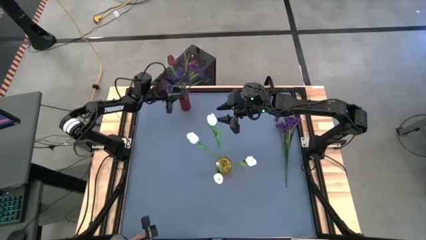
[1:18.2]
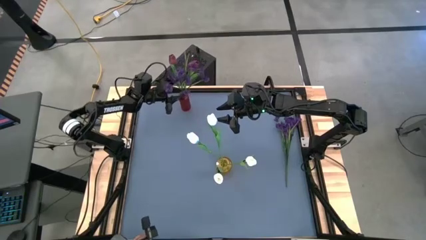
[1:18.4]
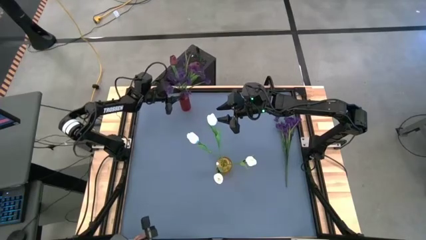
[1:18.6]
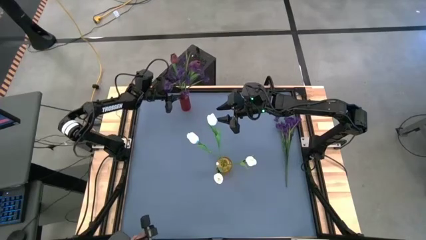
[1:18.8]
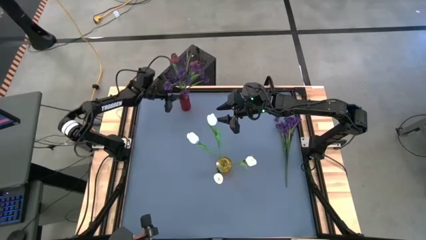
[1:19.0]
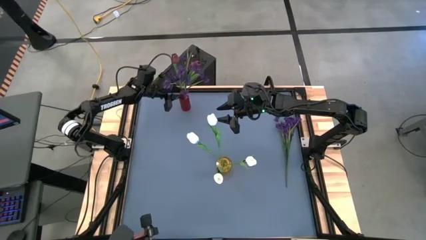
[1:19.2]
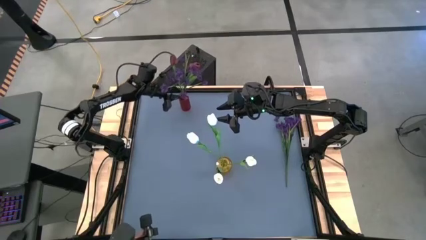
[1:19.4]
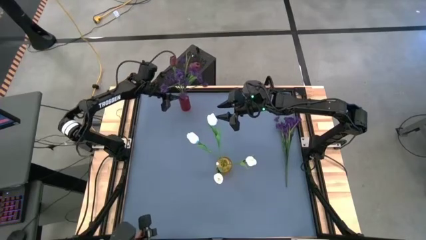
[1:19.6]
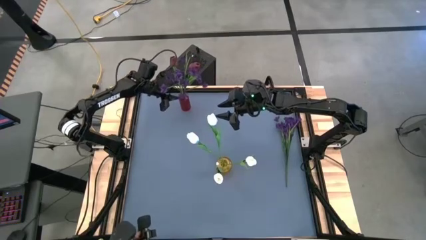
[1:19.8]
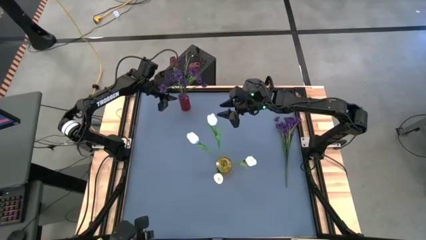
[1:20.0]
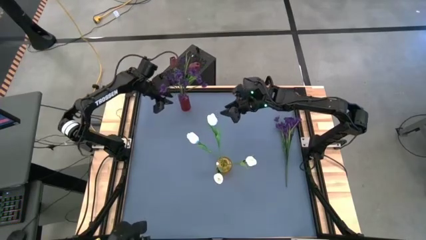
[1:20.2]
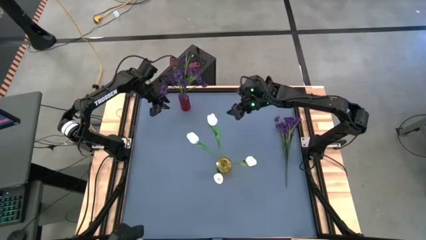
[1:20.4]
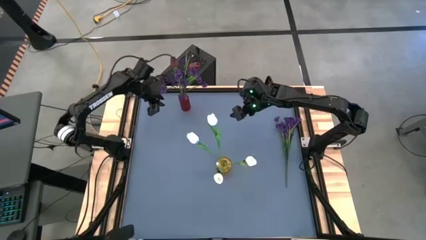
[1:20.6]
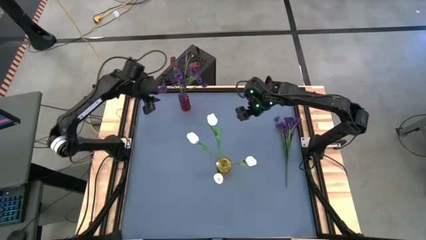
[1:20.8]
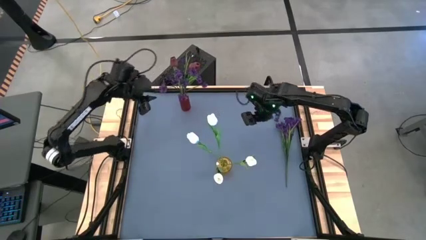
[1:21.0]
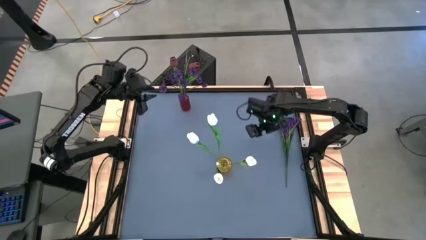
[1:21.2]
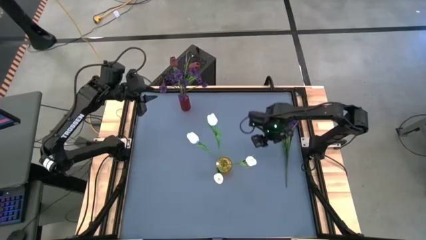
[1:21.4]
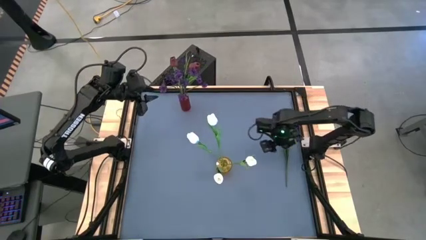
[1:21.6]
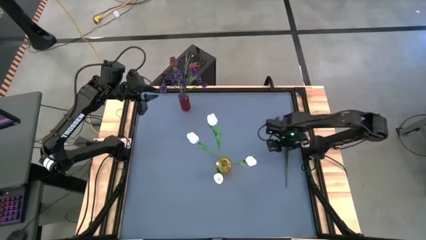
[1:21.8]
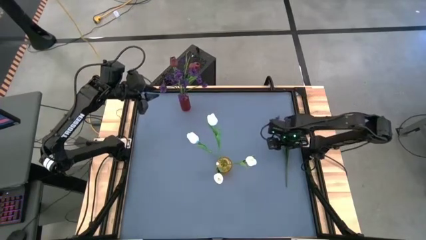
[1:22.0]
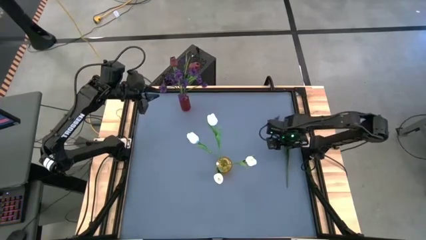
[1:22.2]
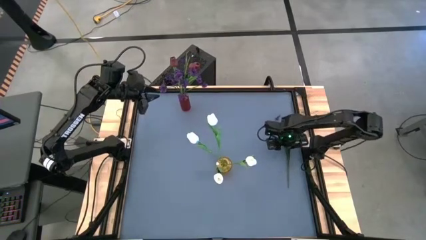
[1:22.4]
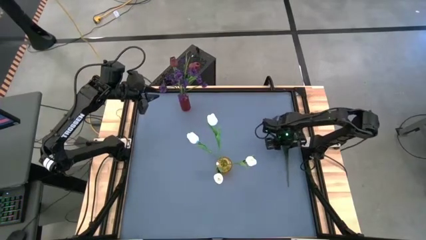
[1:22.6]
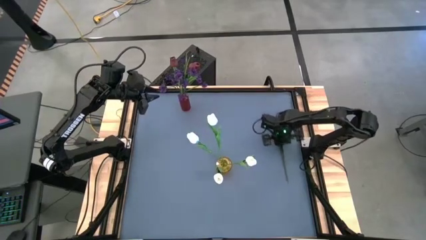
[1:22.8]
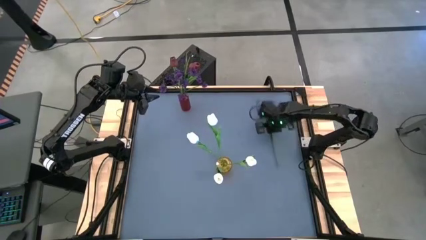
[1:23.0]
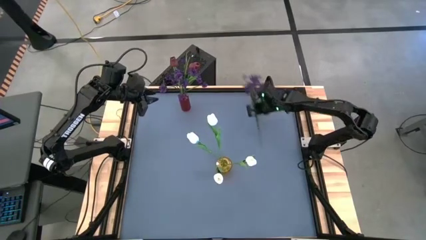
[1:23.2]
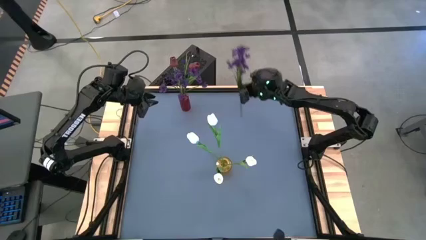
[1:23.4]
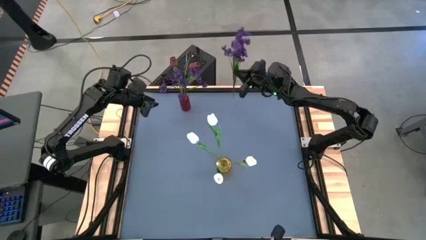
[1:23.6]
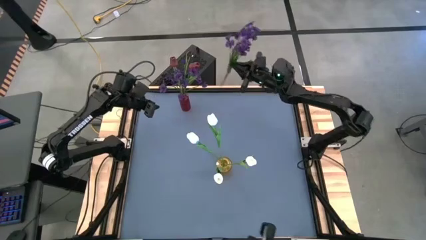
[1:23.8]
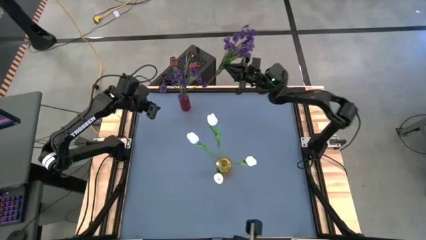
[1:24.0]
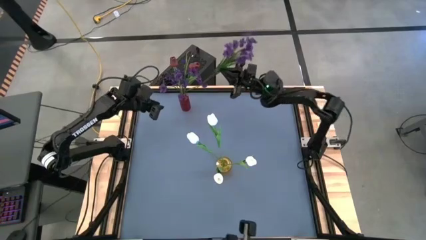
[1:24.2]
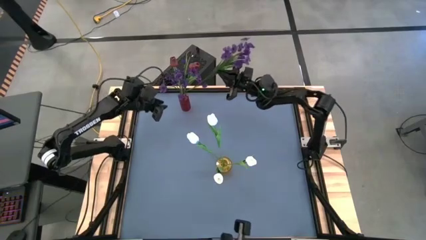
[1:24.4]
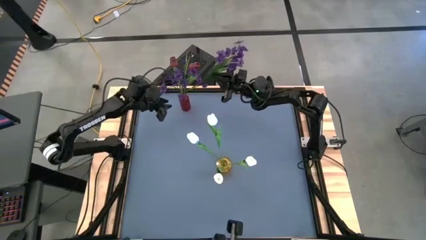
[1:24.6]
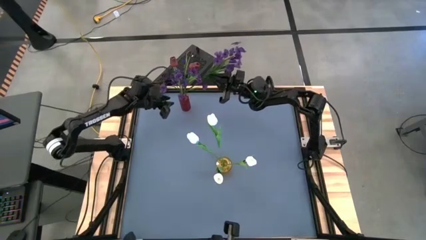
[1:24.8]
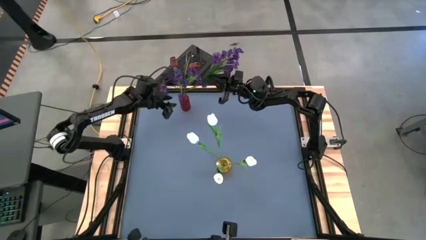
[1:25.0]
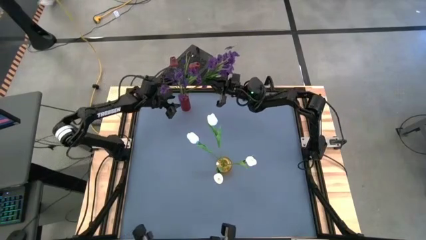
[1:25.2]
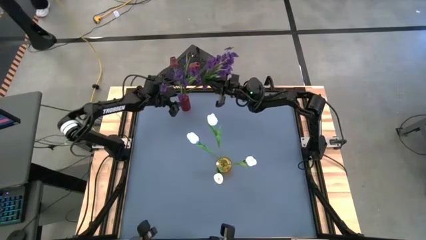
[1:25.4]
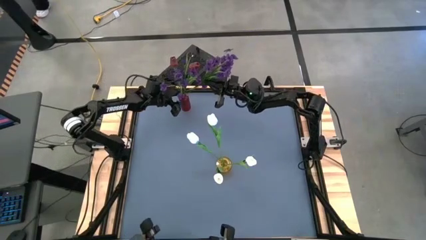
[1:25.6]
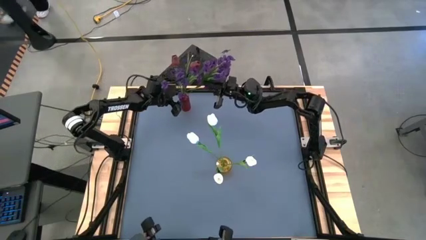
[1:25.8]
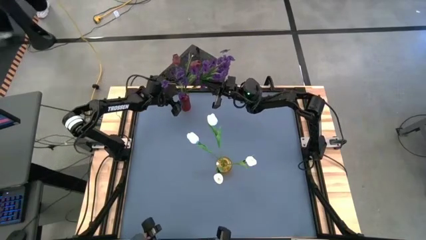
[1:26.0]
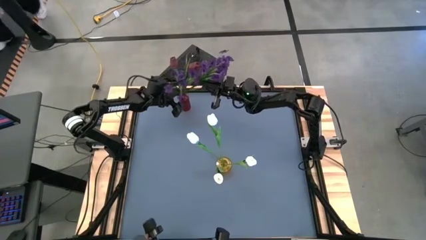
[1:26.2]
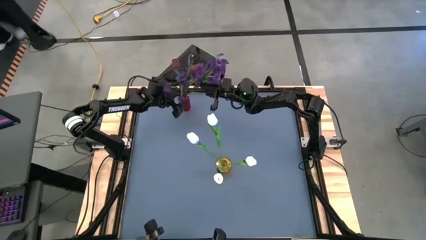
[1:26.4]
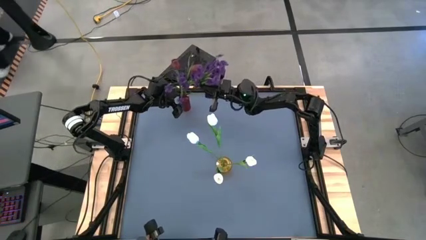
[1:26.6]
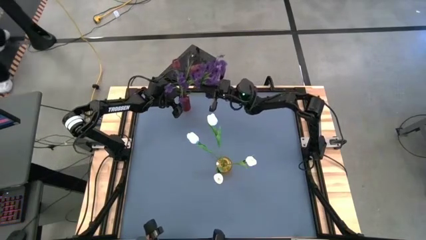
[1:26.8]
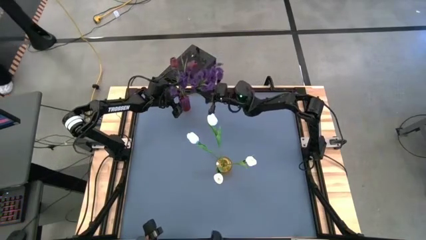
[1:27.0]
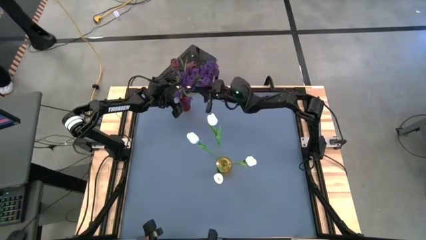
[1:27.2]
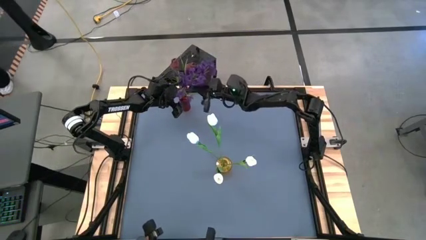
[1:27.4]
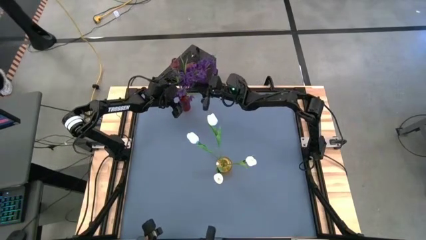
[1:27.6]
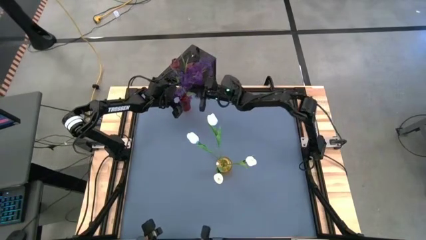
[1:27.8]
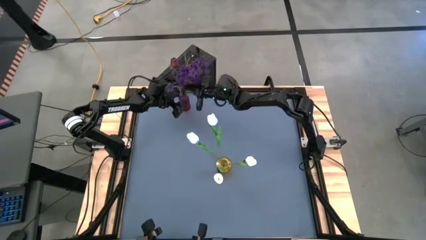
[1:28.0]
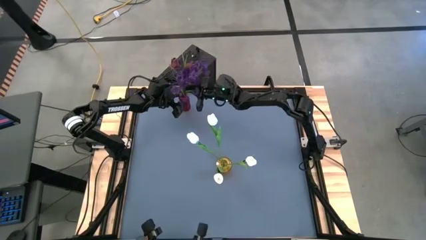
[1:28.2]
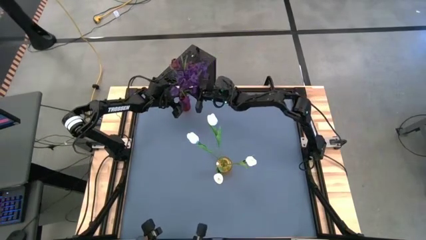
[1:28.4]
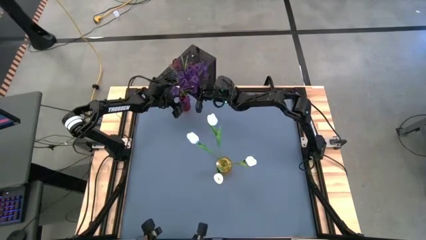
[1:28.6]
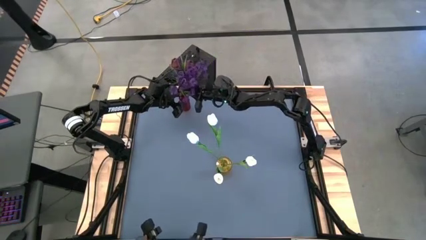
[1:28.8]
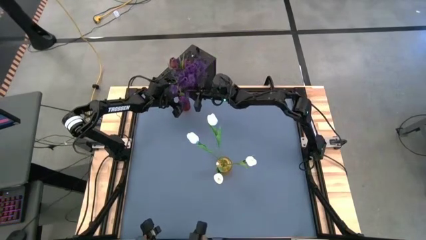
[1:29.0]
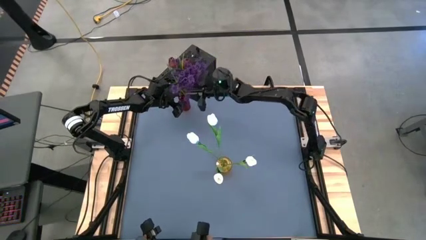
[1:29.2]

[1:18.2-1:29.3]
Task: Sort flowers into vase by color
Put the violet flowers into the red vase

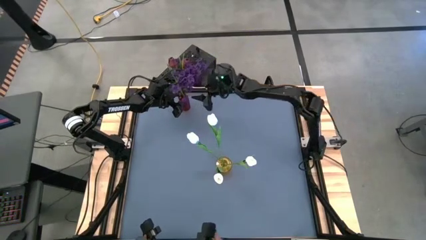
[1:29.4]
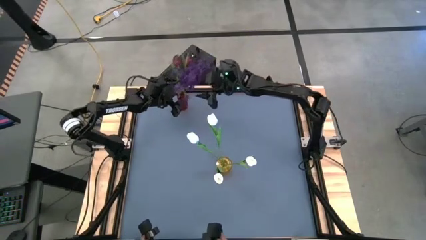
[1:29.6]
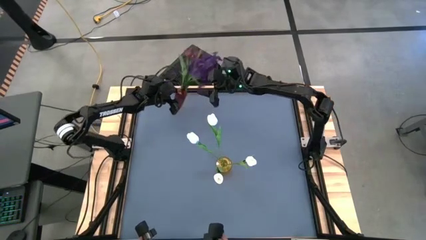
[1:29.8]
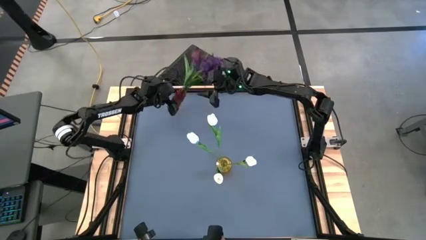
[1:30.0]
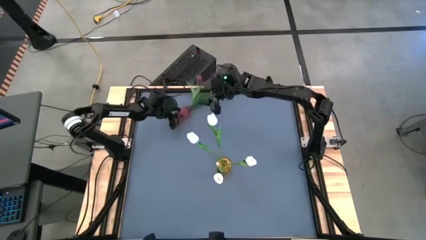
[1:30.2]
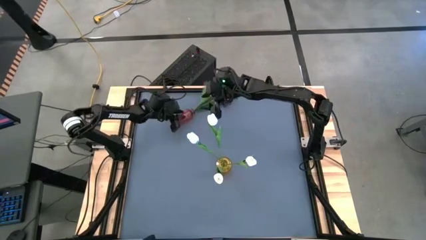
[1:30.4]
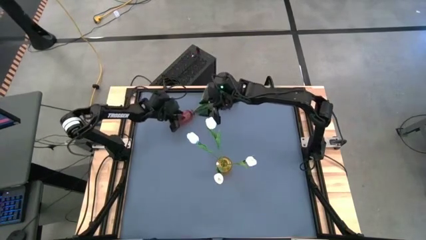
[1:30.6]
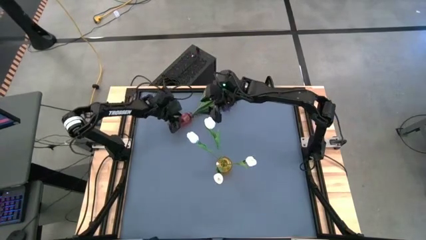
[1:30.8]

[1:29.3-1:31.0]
Adjust the red vase
